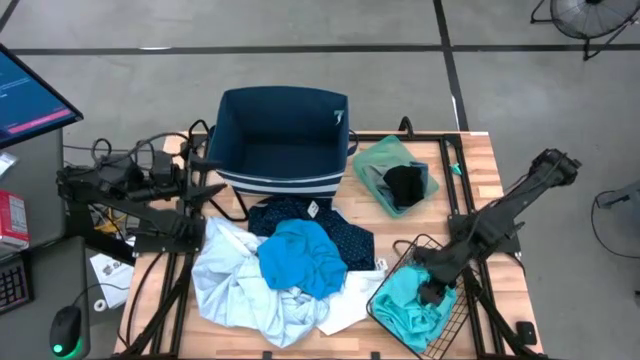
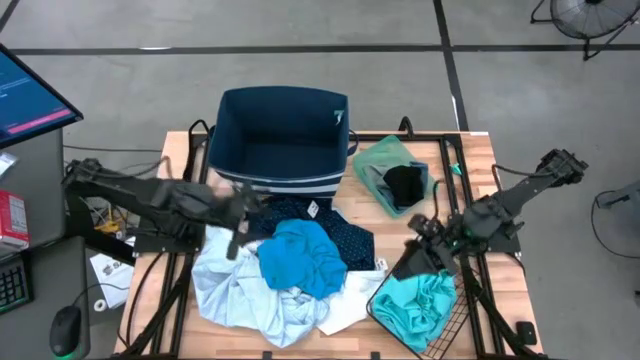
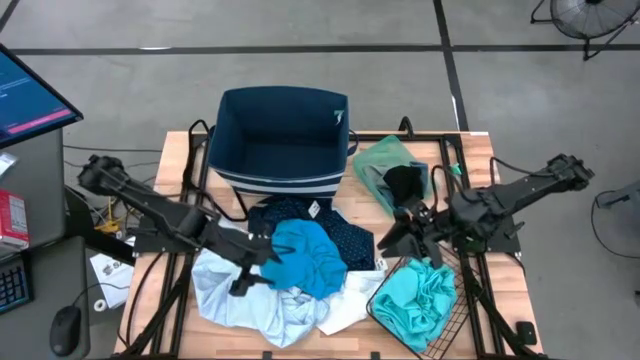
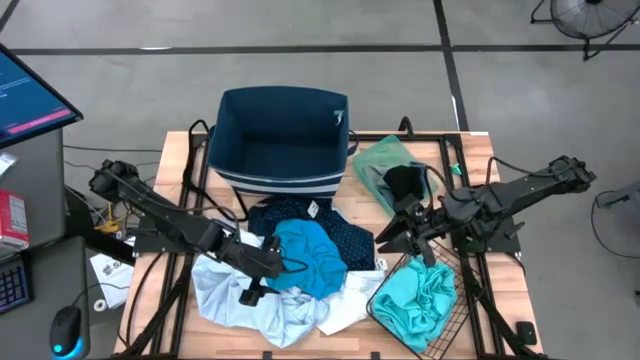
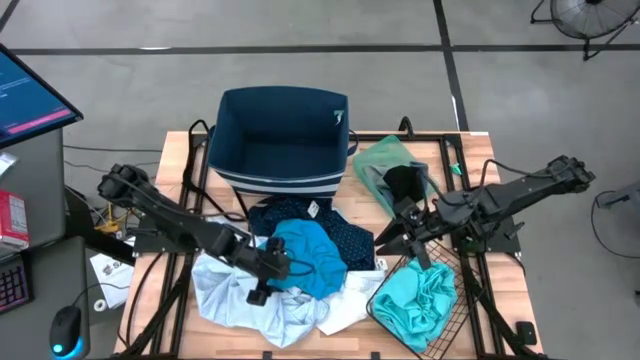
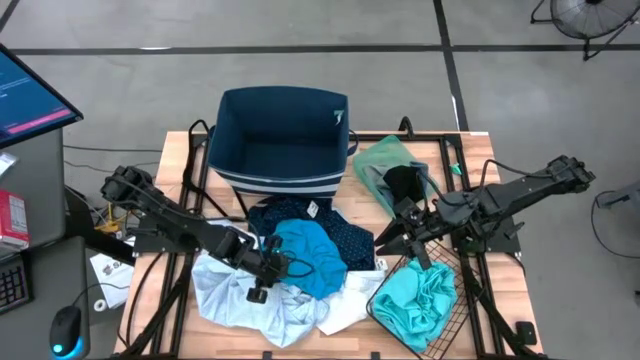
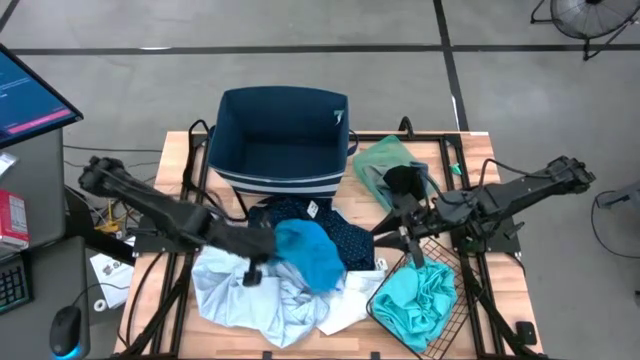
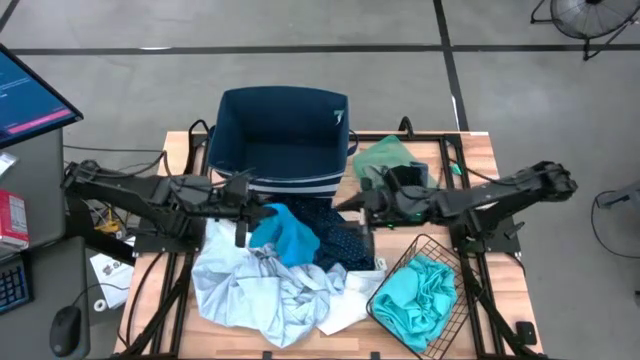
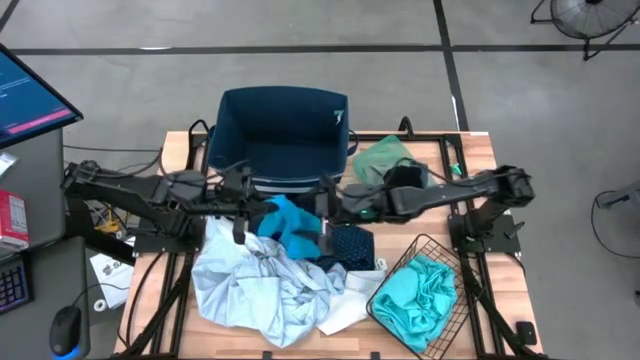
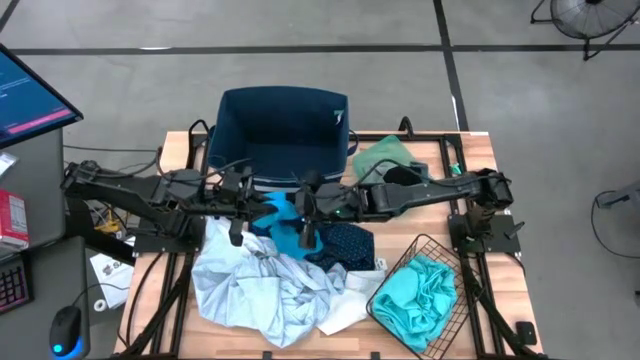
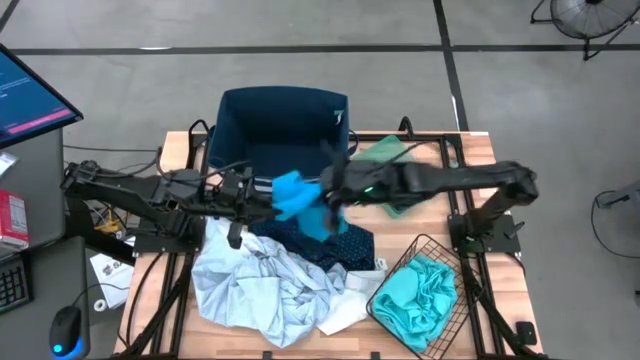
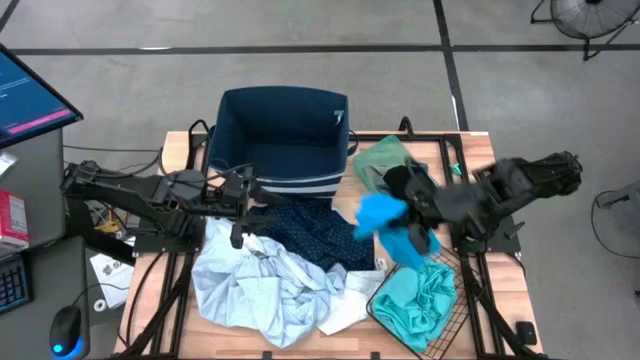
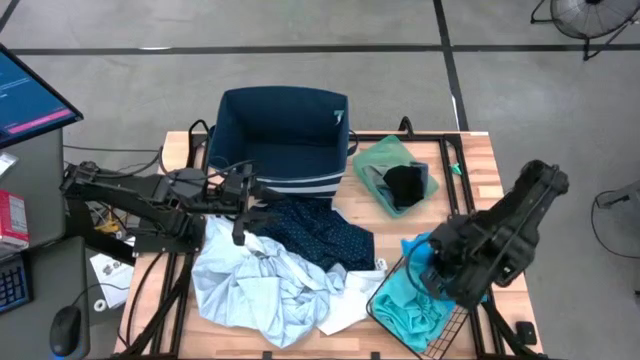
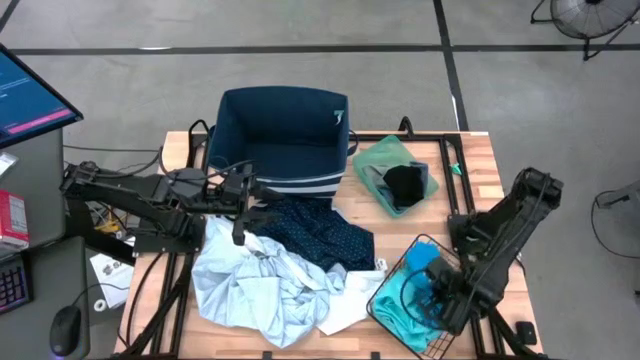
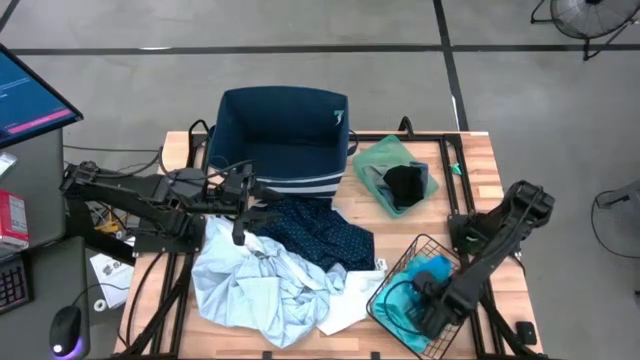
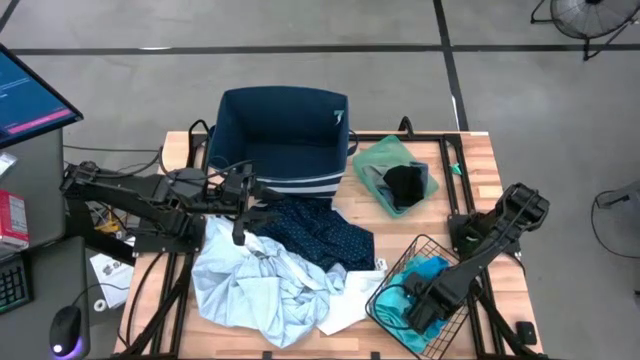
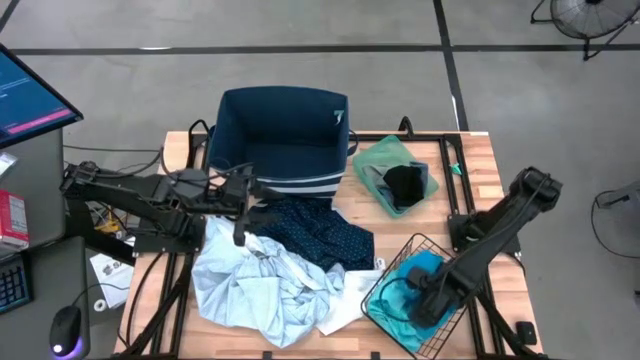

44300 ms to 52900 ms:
Task: Pick & Place Cloths
Put the blue shorts into the black wire basket

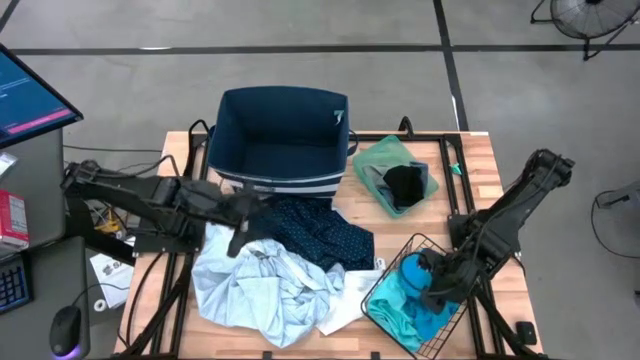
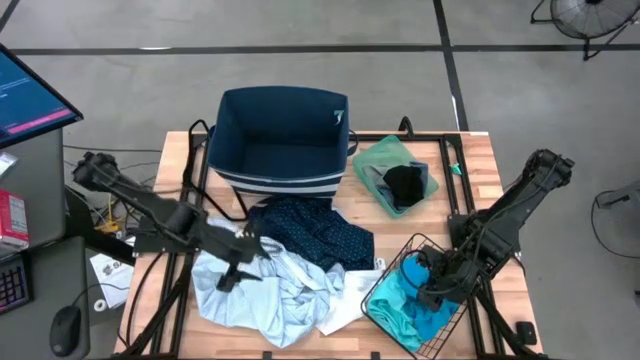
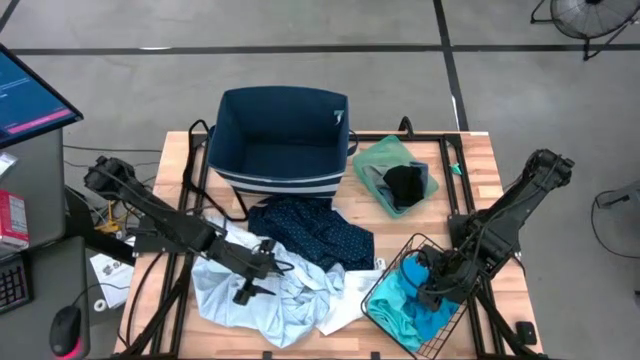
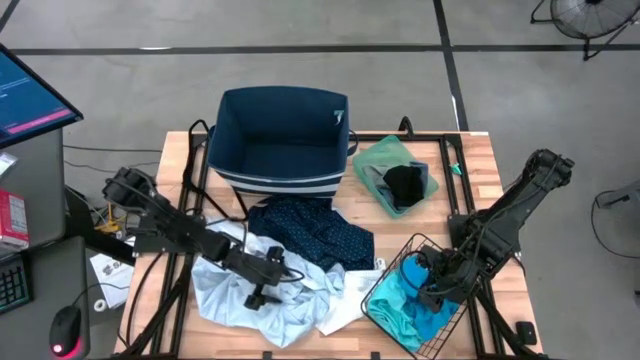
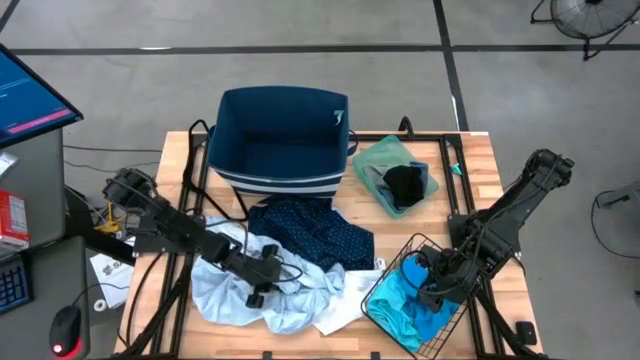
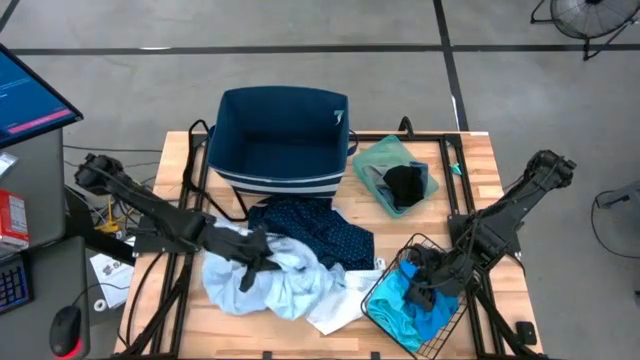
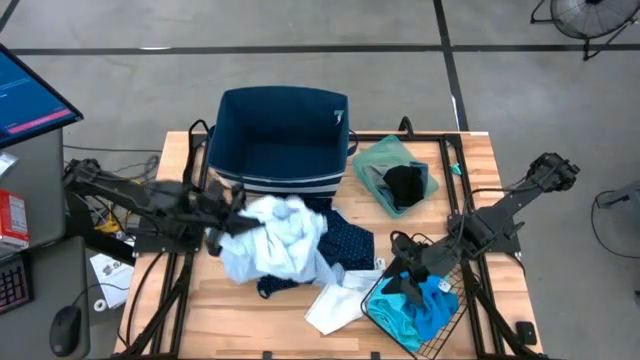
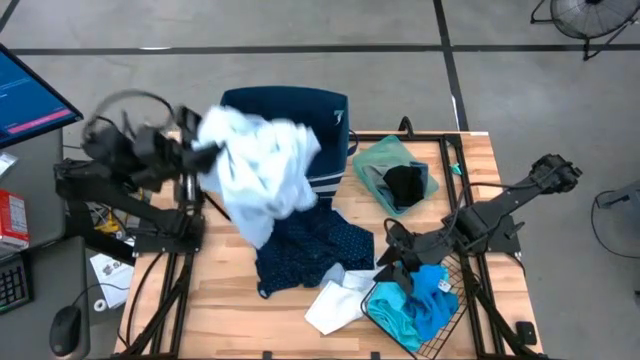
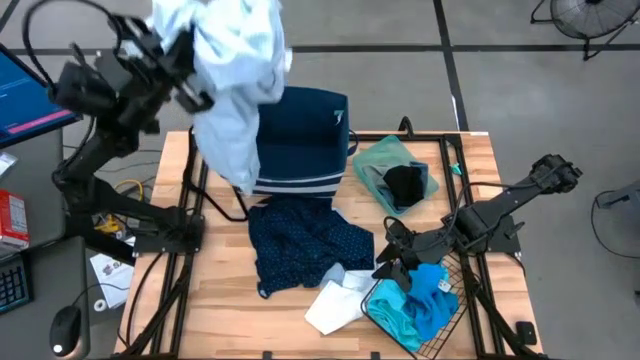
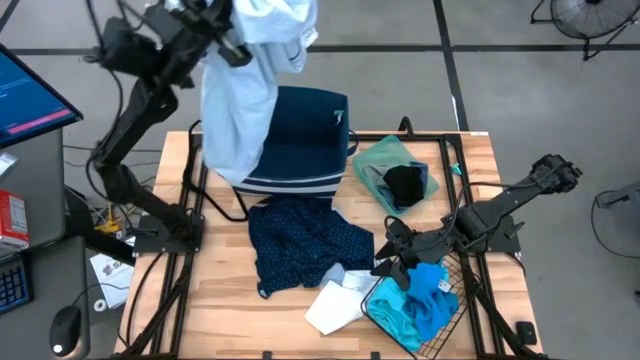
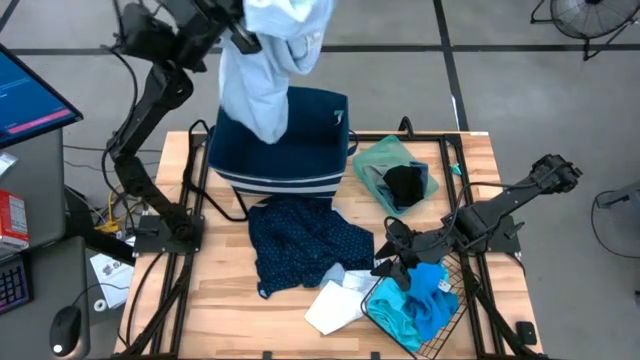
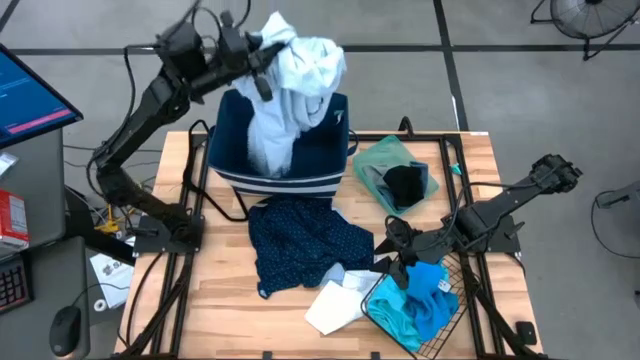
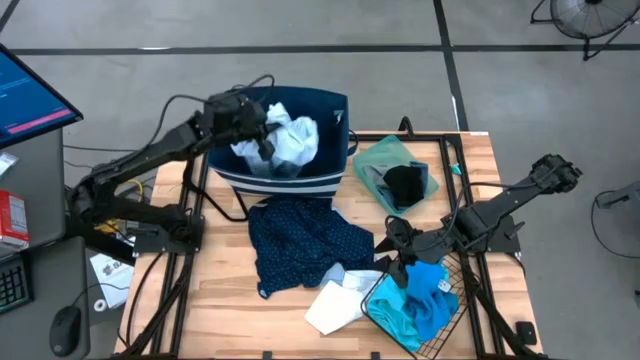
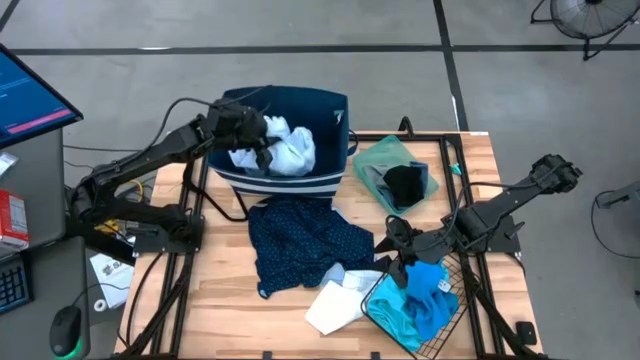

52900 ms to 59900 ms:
Put the white patterned polo shirt into the blue laundry bin

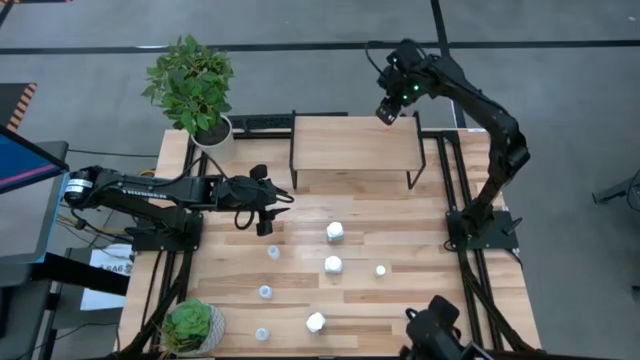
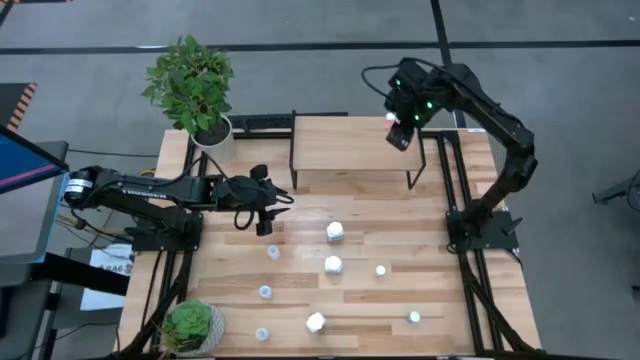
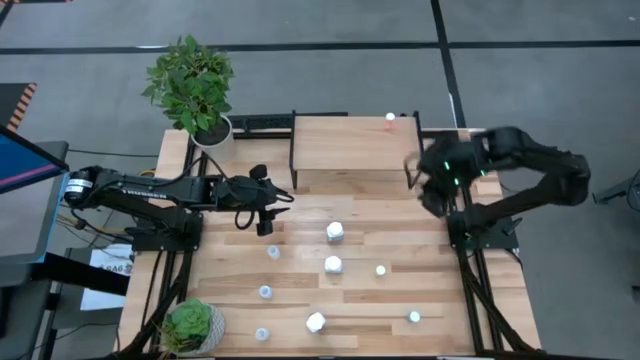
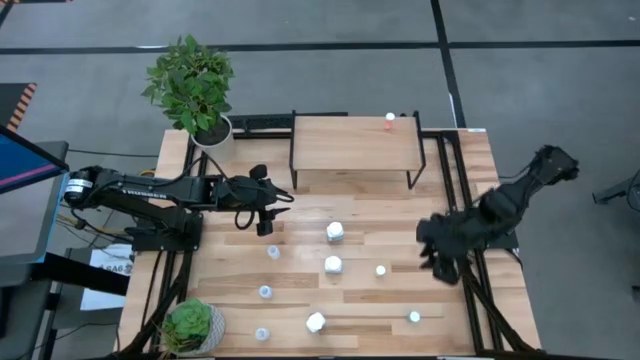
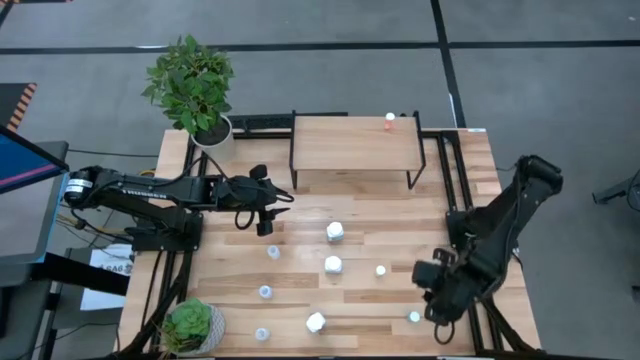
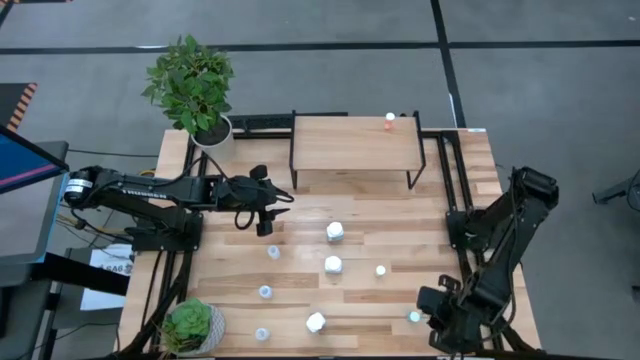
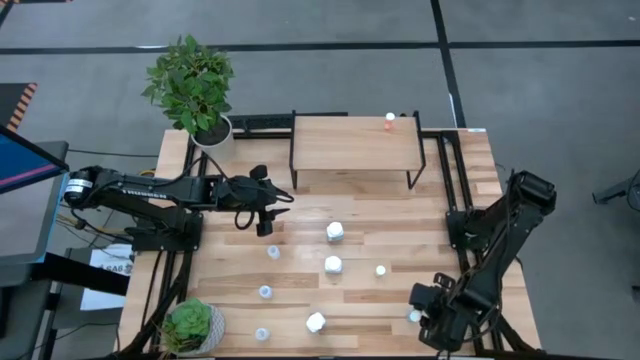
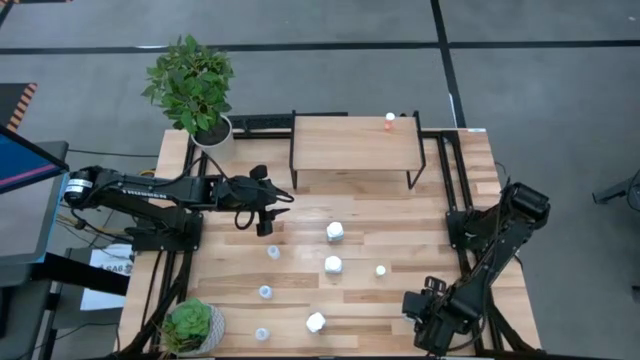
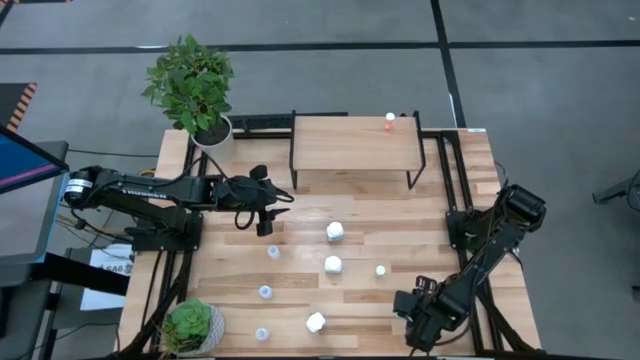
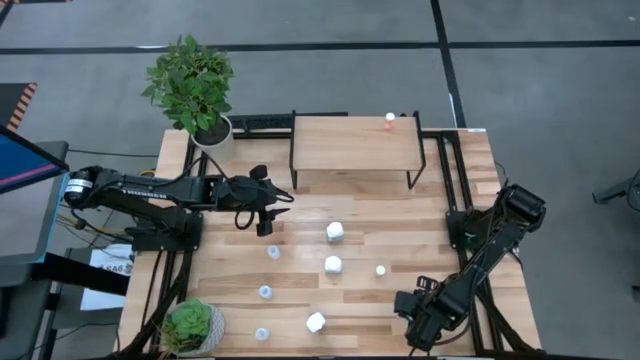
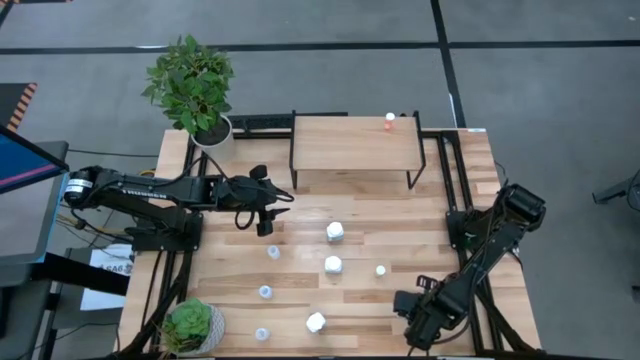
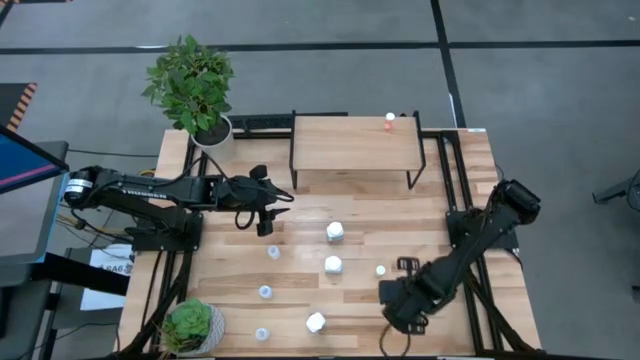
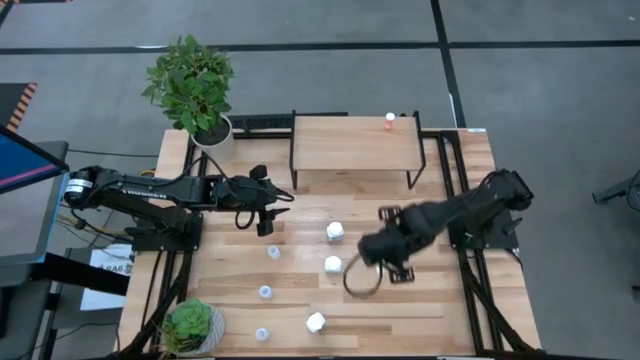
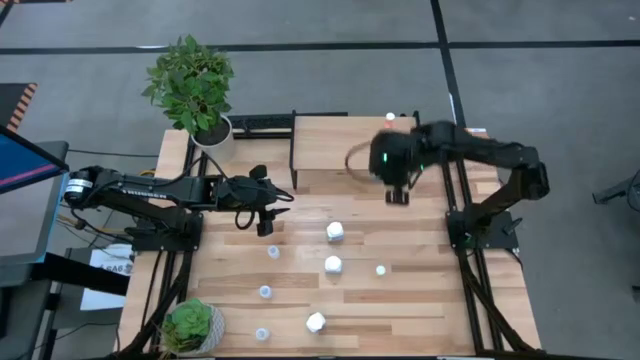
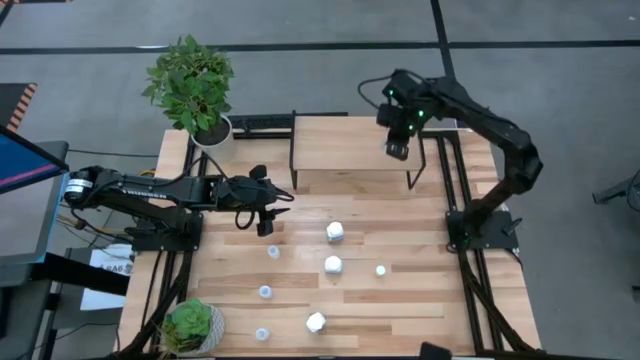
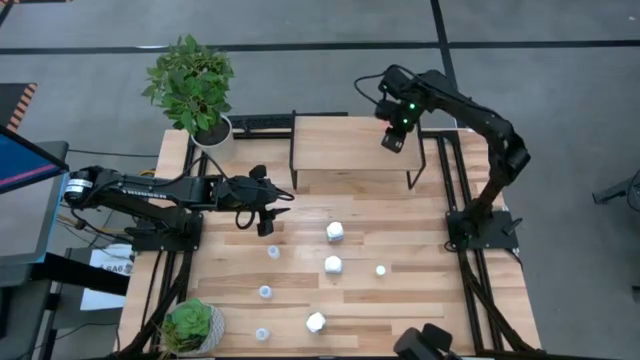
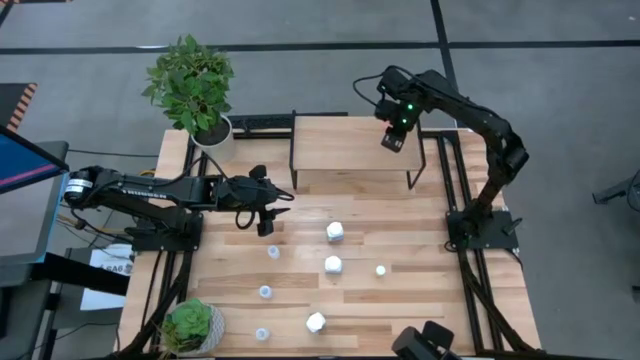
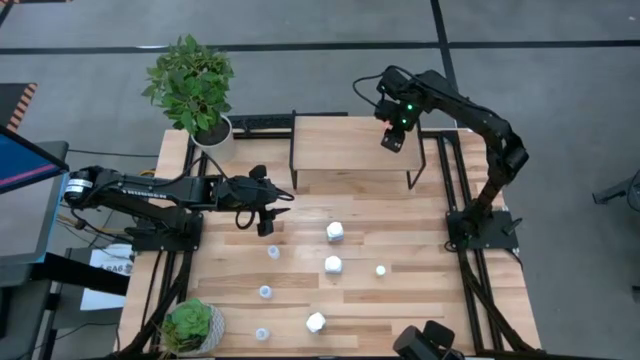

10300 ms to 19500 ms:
Task: Pick and place medicine bottles onto shelf by color
Put the blue pill bottle on the shelf
